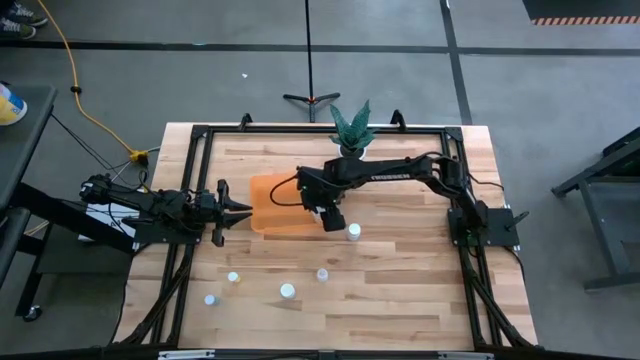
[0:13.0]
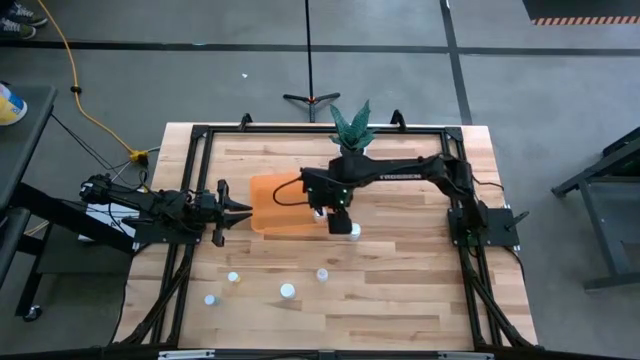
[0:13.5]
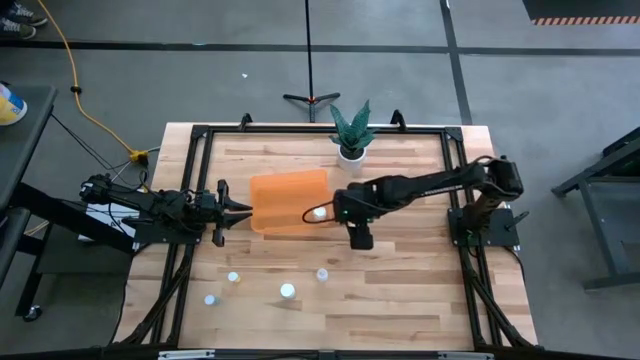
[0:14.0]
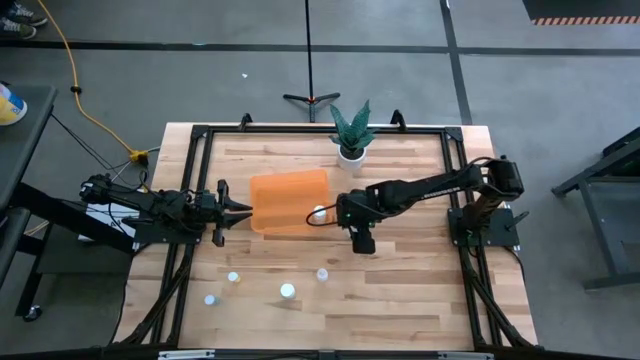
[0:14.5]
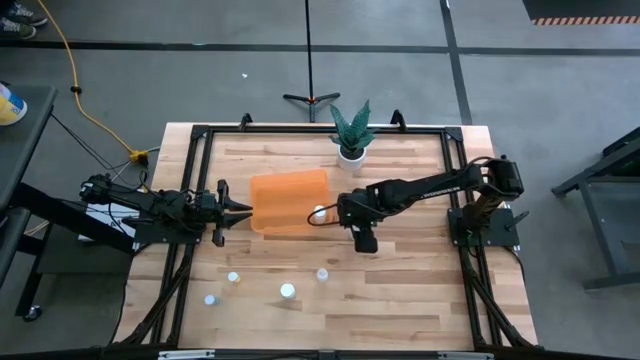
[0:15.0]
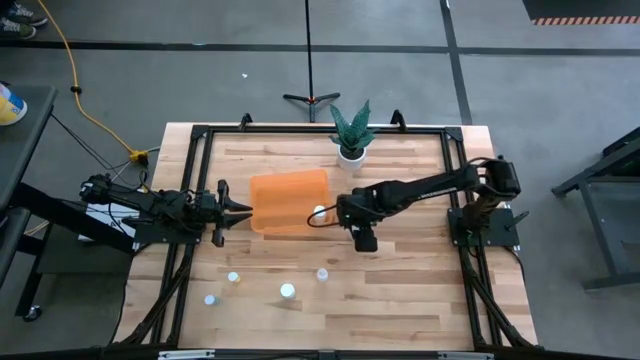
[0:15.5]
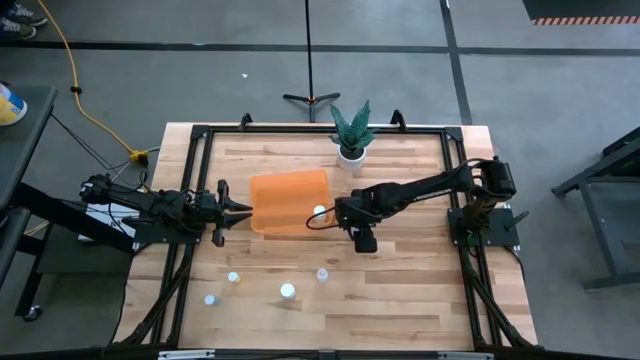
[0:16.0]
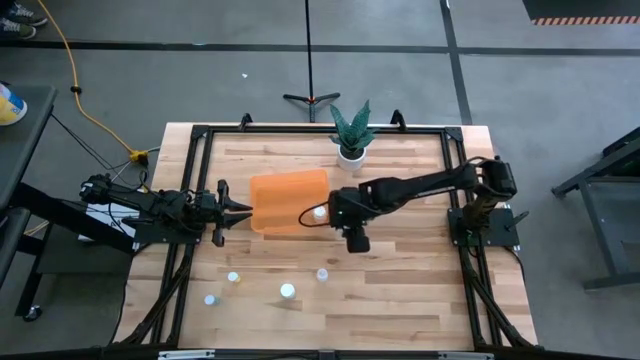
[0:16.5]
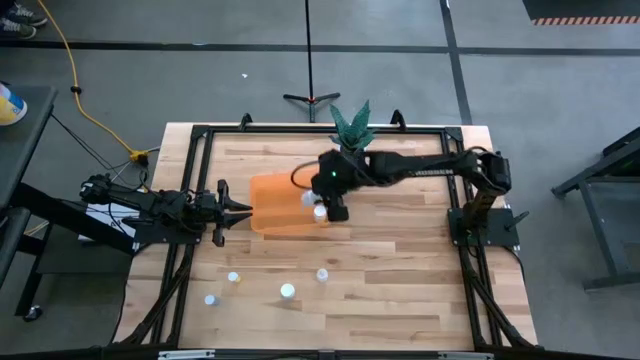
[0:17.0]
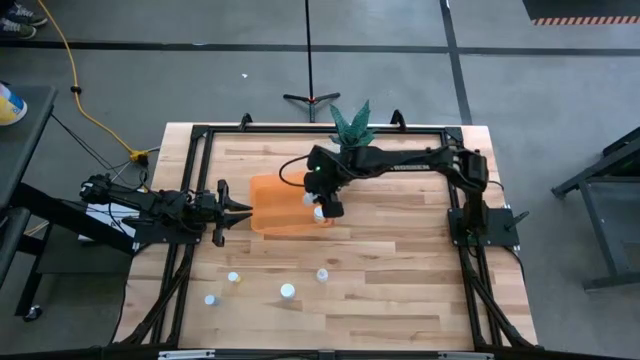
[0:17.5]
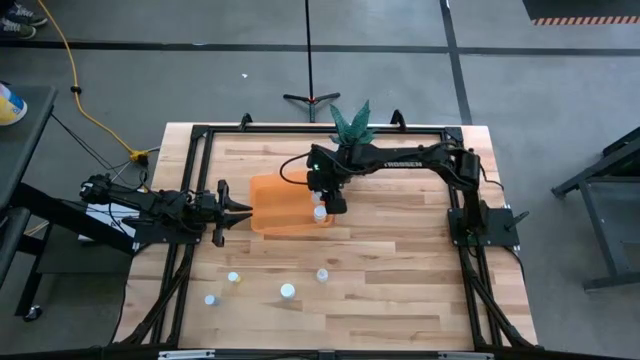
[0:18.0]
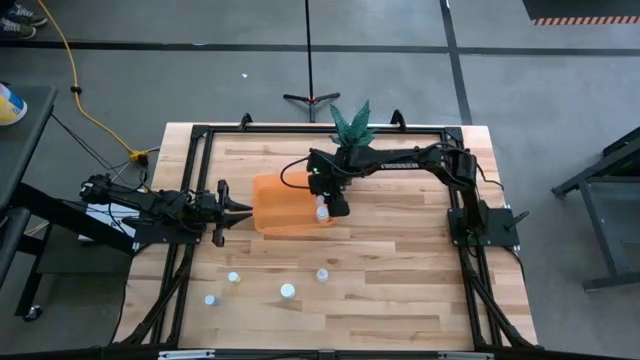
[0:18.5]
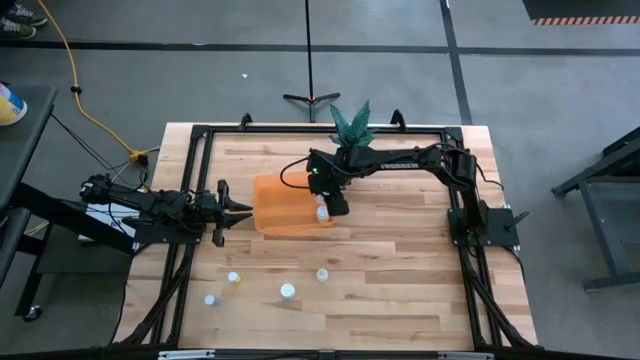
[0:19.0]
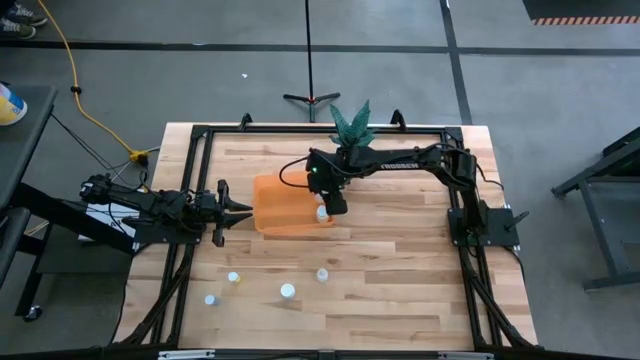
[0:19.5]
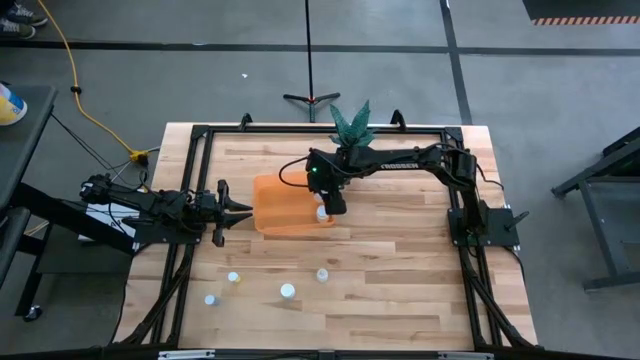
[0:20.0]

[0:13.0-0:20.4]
Task: Pick and place pill bottles into a basket
Put the top white pill bottle in the orange bin

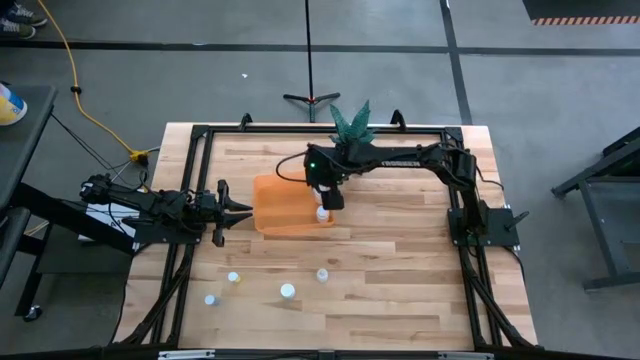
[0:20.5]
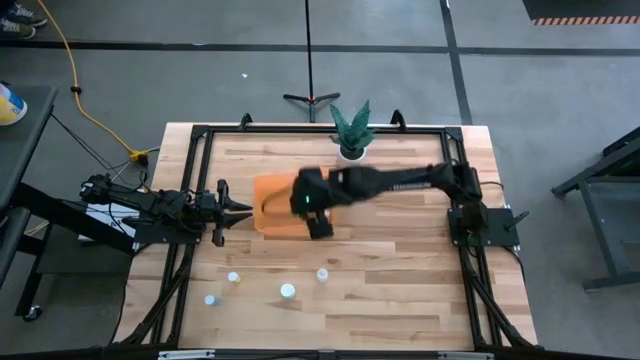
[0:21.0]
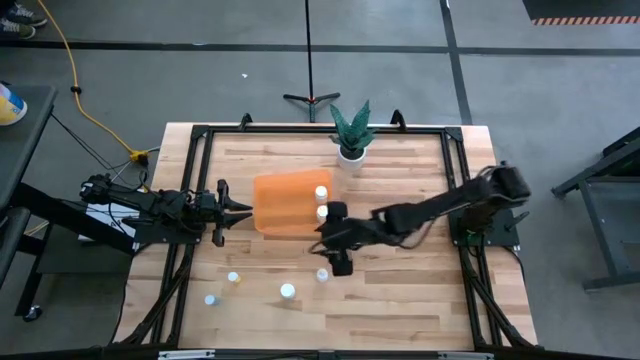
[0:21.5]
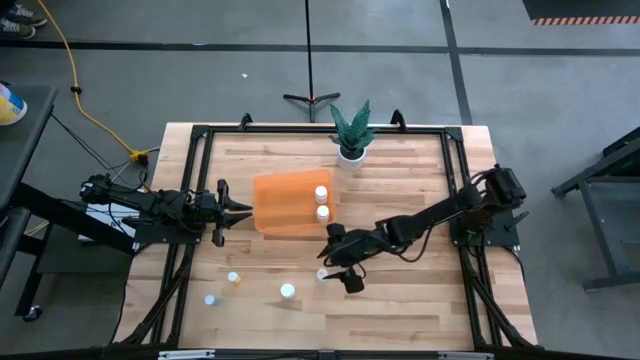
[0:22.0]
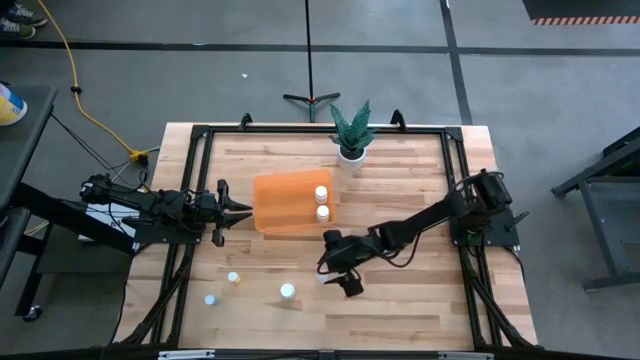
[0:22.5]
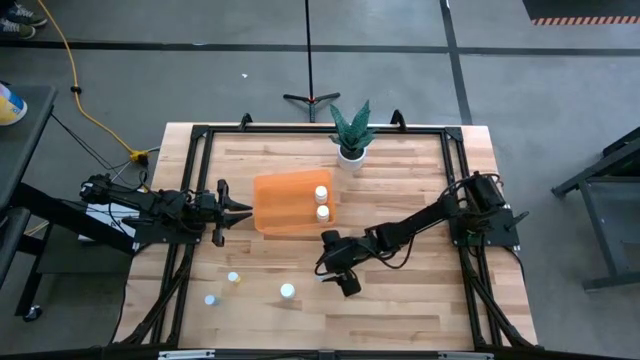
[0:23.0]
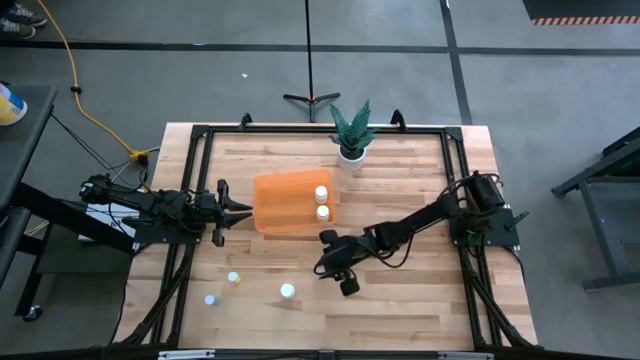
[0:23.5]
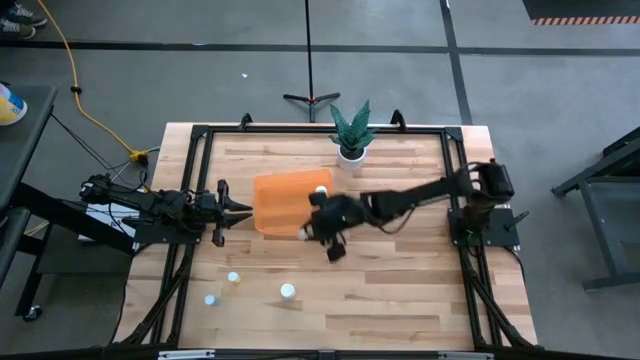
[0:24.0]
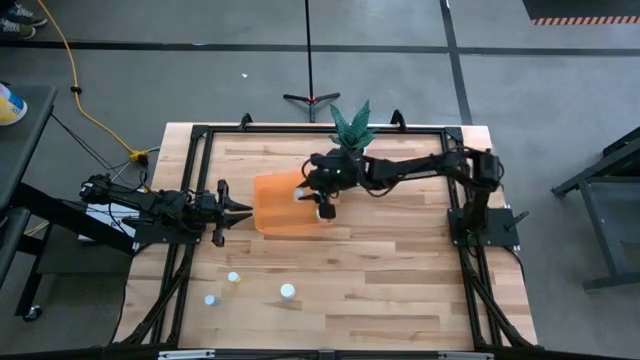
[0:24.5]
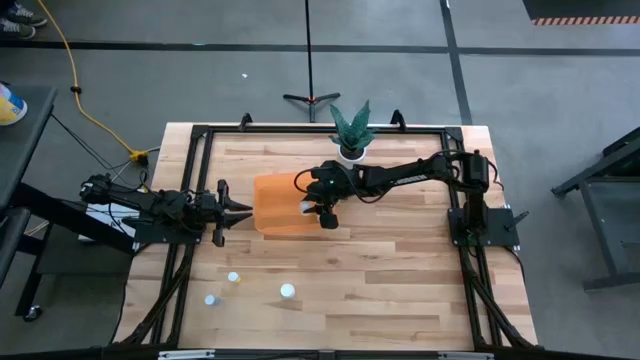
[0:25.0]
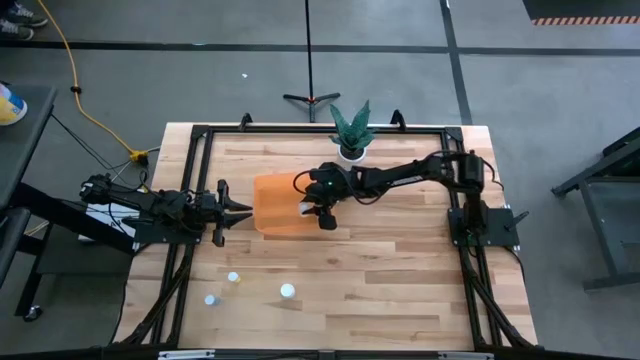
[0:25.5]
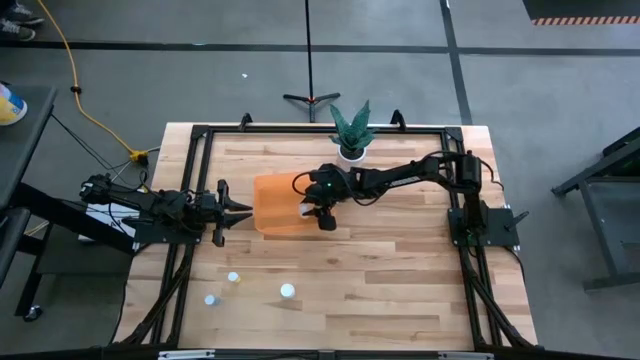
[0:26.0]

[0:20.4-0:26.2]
Put the transparent pill bottle in the orange bin

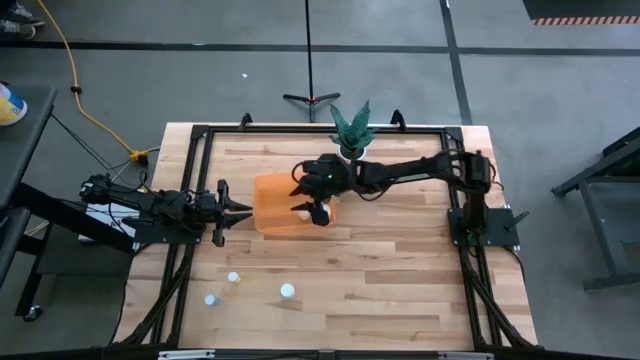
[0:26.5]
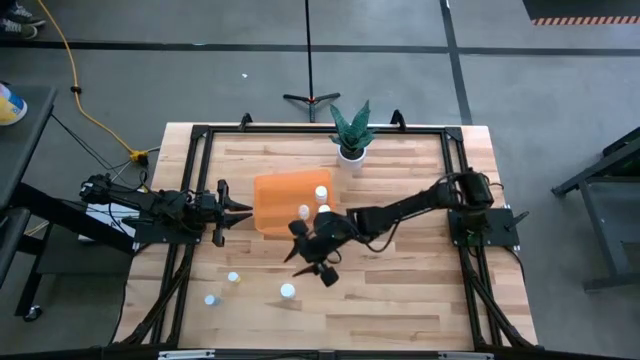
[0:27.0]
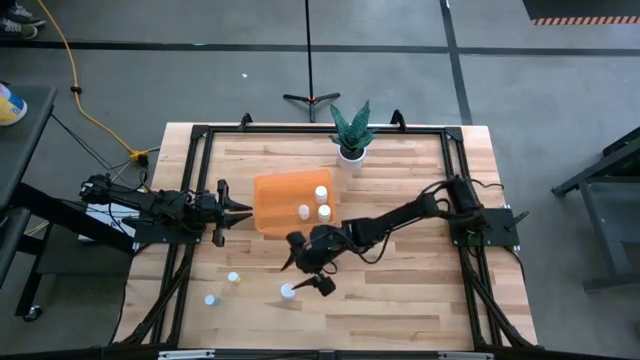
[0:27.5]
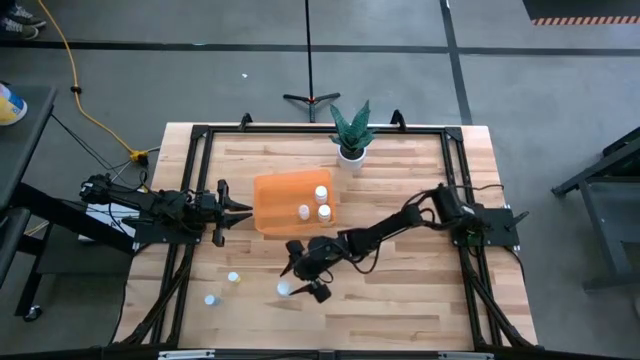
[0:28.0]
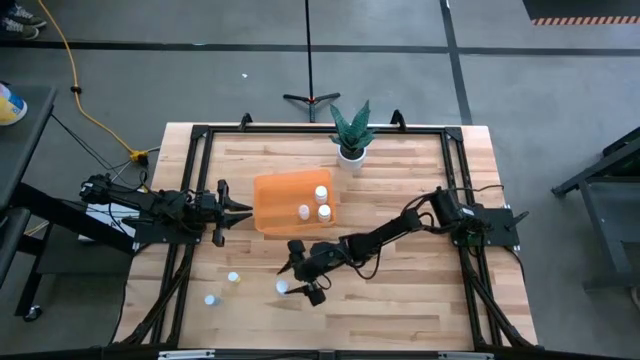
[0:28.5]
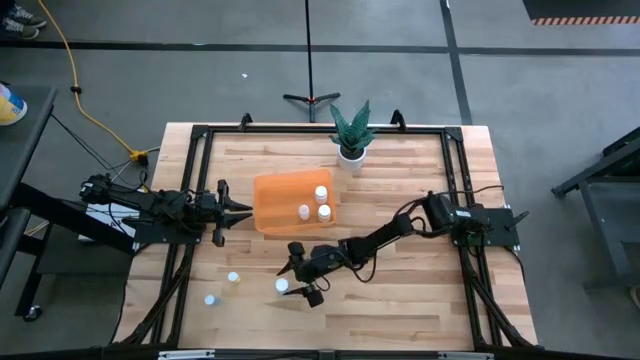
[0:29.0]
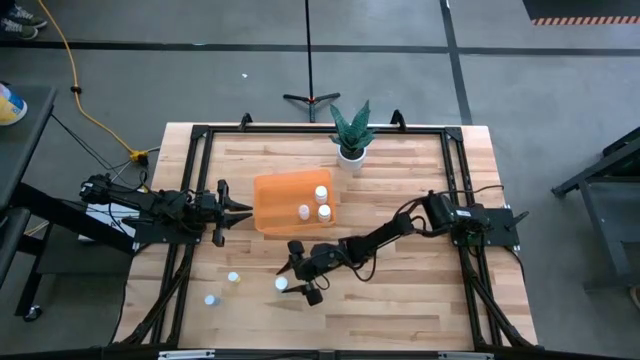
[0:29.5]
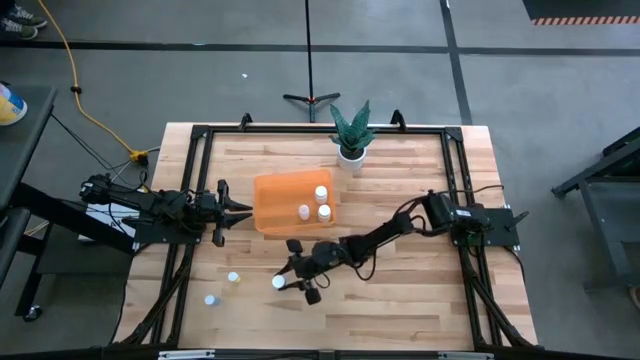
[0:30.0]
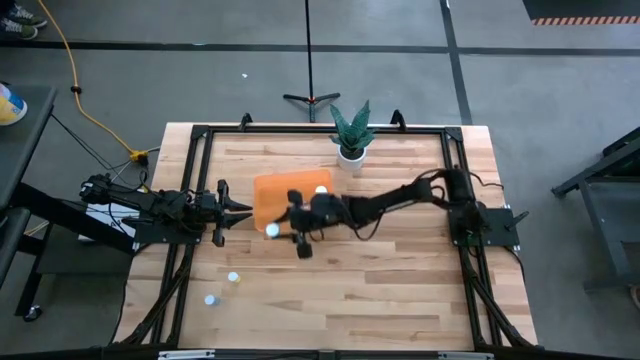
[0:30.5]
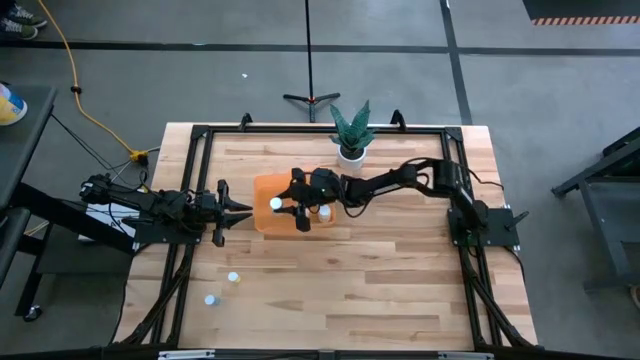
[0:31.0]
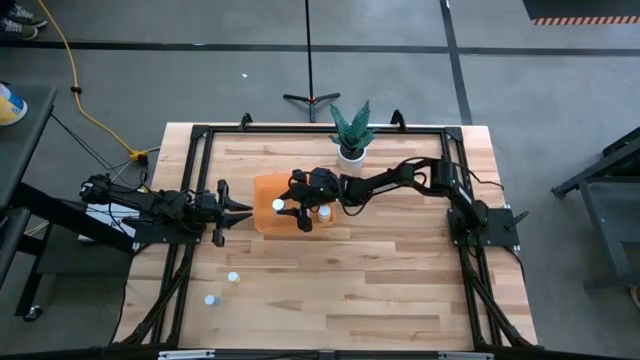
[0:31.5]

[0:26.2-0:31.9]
Put the white pill bottle in the orange bin

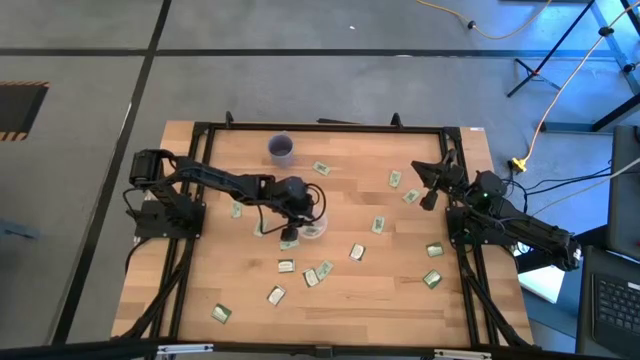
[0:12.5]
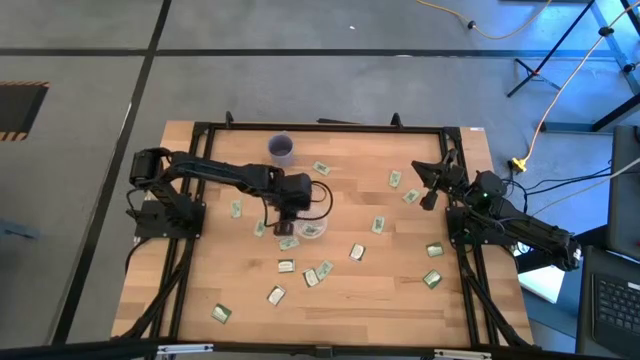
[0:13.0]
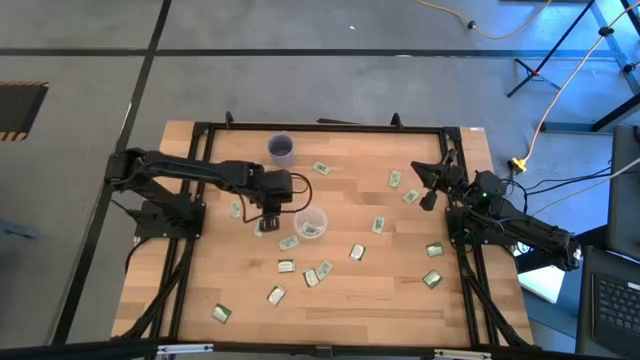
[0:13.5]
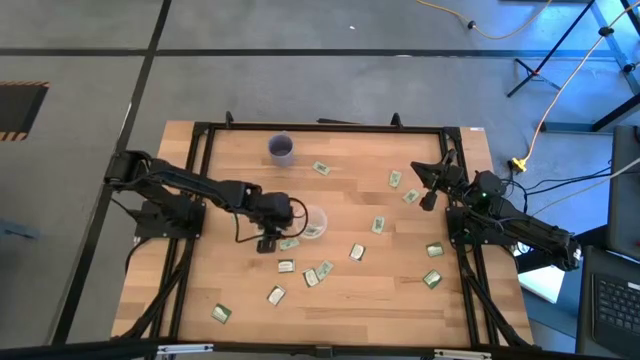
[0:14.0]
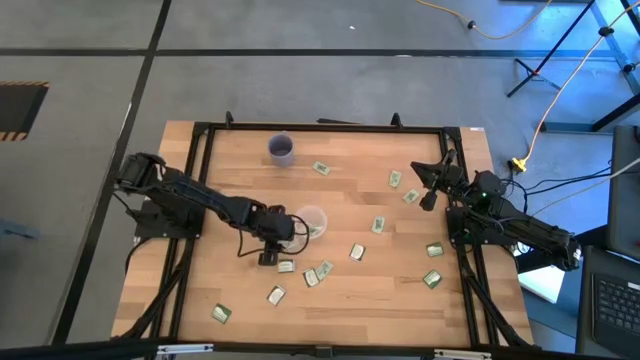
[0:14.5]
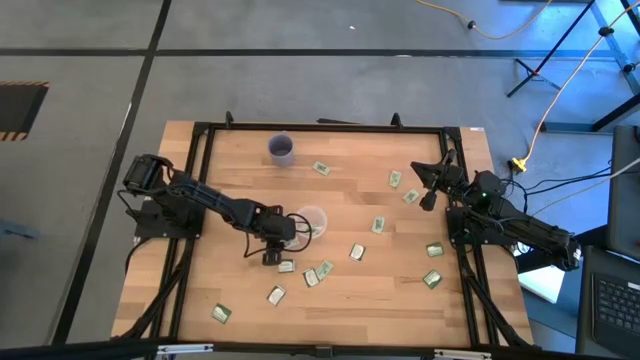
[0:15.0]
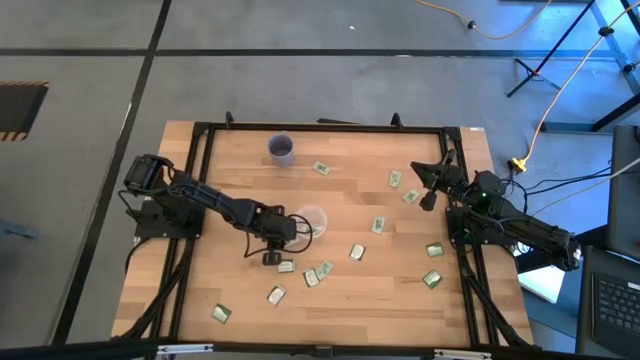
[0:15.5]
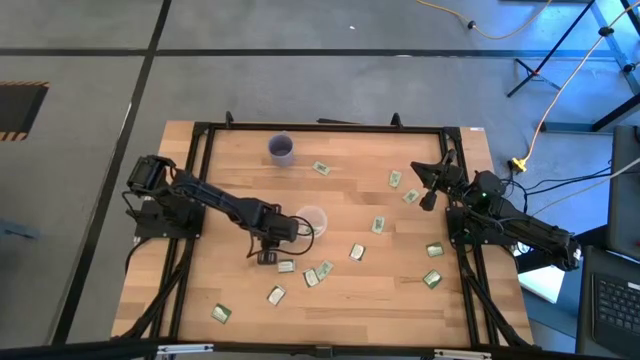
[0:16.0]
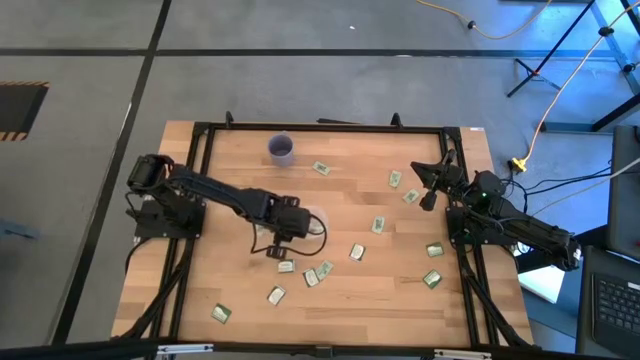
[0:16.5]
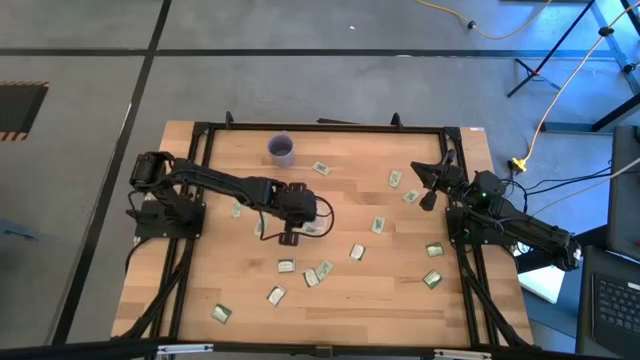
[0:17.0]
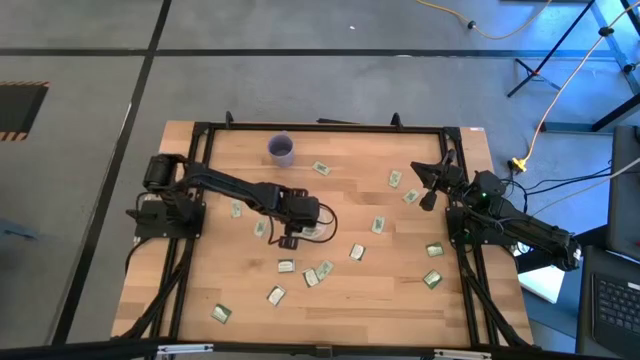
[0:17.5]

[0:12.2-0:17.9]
Task: Pick and place Stevia / Truvia into bins
Put the stevia packet into the transparent container
